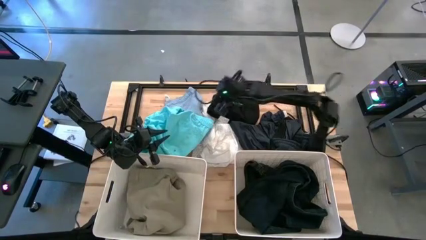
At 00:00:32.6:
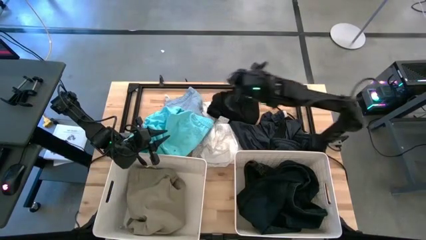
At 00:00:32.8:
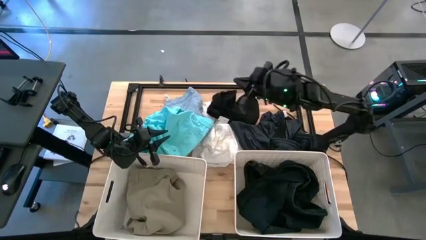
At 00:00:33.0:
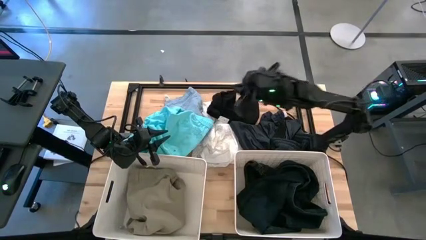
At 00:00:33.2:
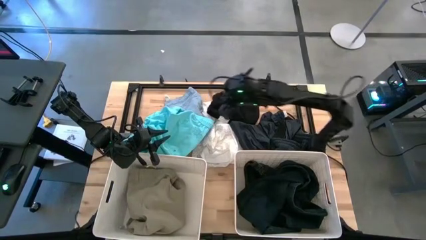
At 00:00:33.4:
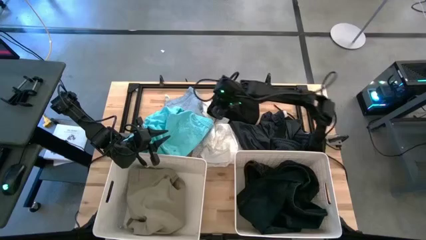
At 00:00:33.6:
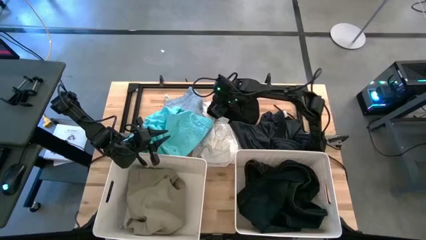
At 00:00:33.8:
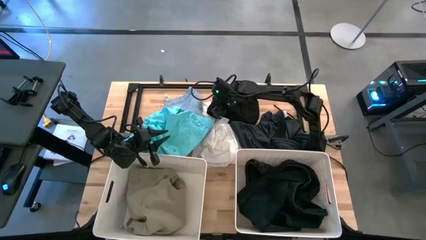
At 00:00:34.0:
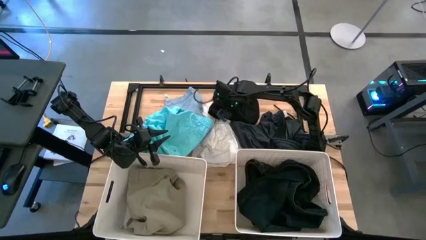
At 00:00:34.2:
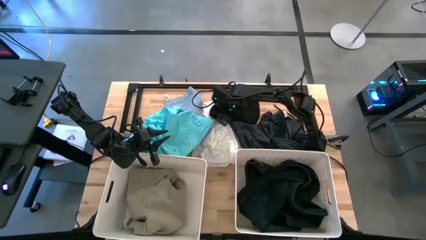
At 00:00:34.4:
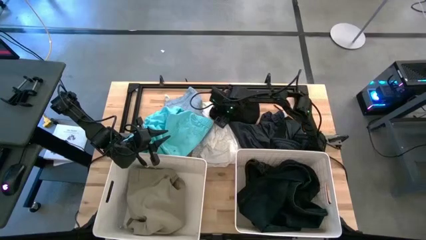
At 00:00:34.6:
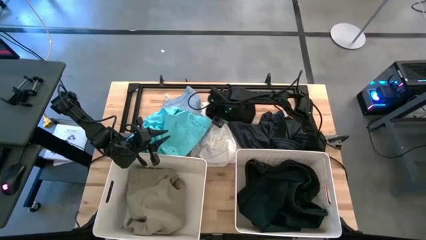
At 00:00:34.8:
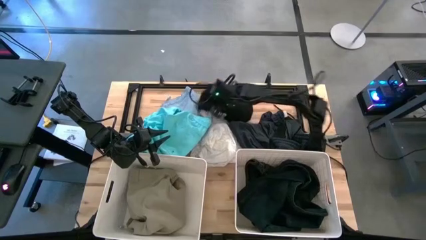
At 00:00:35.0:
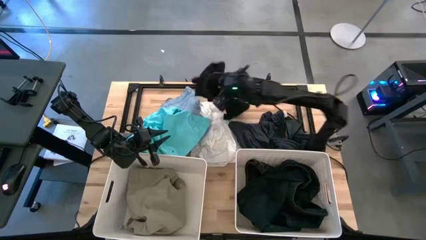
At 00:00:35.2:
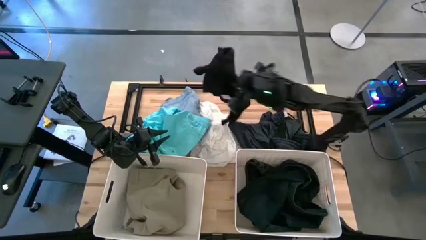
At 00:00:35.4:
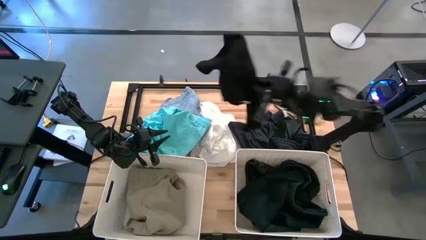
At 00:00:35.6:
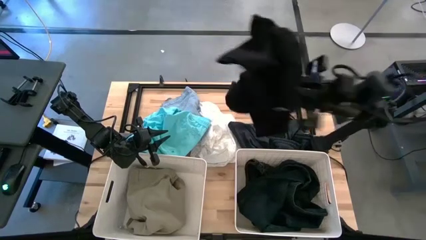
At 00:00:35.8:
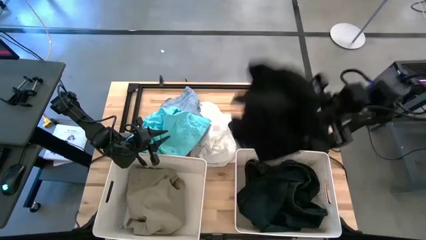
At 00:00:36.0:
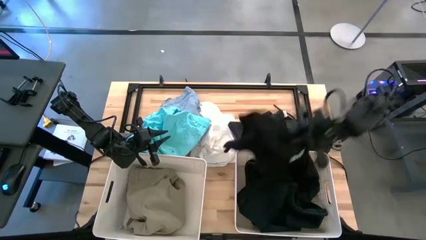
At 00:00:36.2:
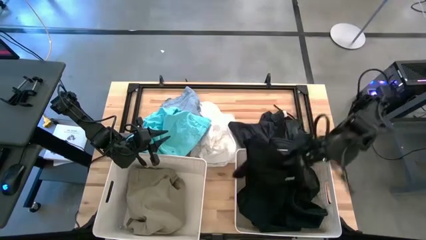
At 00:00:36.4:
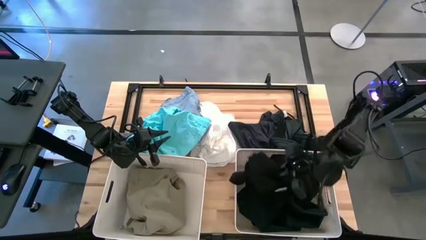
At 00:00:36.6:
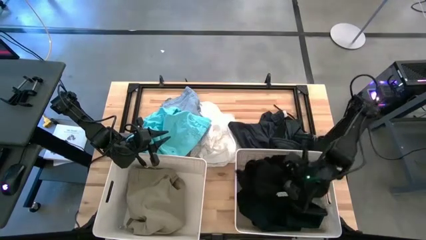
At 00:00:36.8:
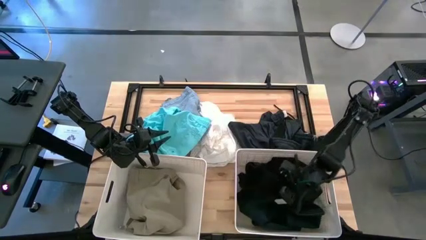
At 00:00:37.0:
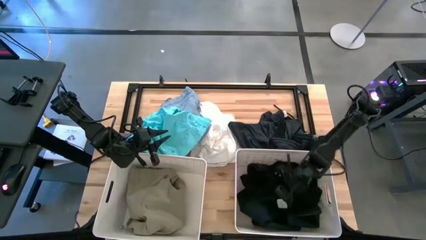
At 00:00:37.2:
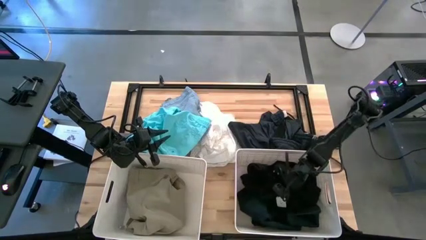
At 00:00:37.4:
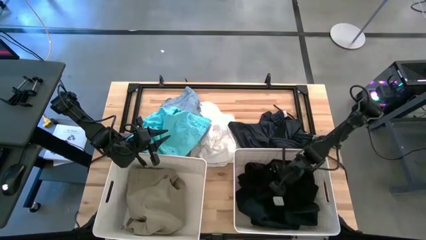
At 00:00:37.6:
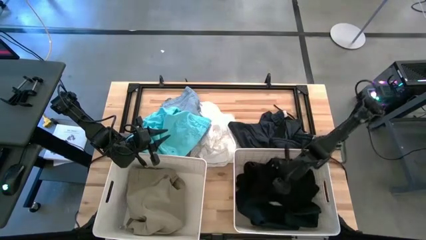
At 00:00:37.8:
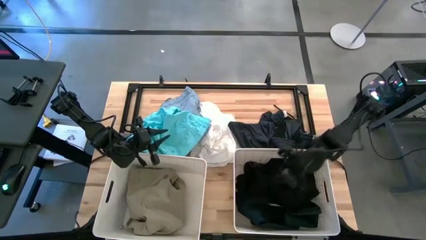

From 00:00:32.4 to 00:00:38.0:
Task: Sort clothes
Put the black shirt into the right white laundry bin

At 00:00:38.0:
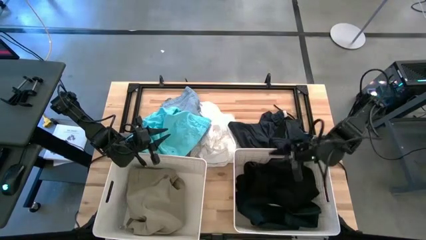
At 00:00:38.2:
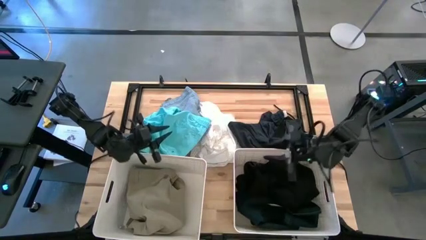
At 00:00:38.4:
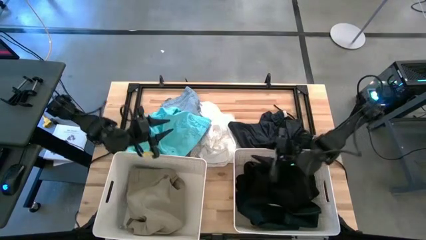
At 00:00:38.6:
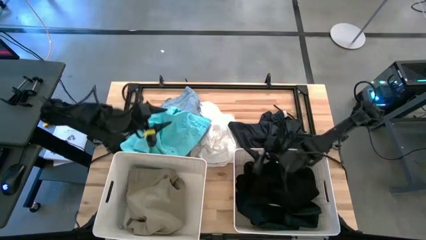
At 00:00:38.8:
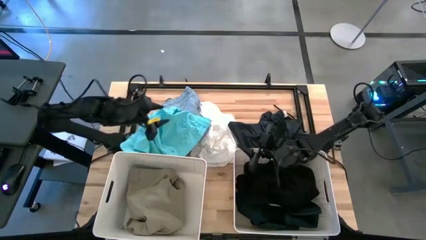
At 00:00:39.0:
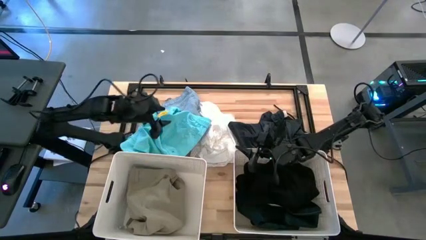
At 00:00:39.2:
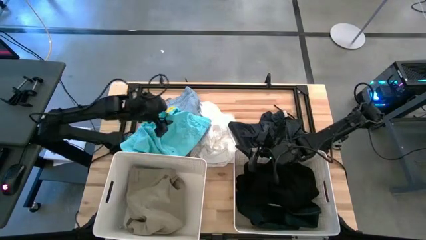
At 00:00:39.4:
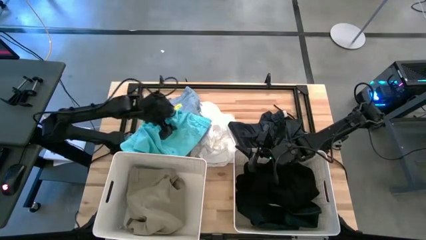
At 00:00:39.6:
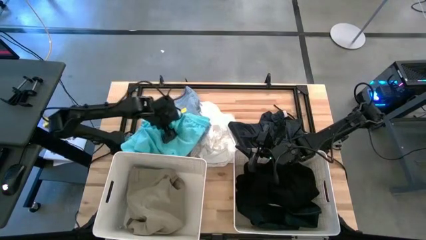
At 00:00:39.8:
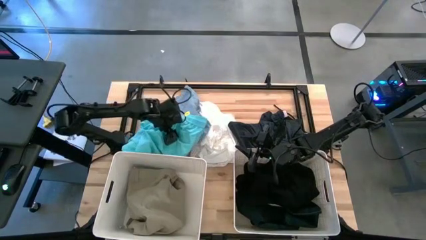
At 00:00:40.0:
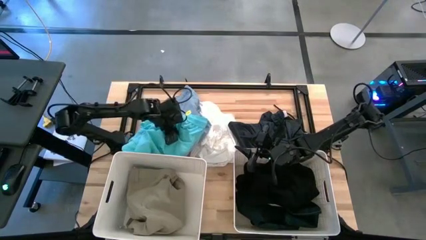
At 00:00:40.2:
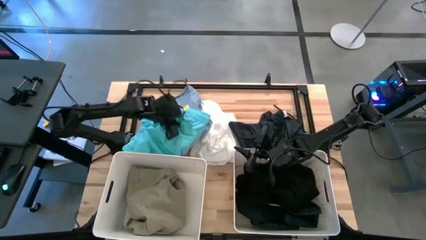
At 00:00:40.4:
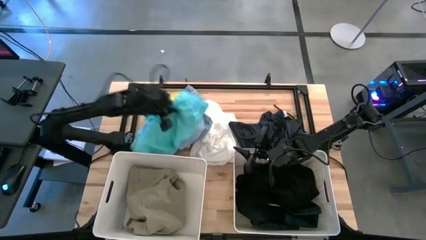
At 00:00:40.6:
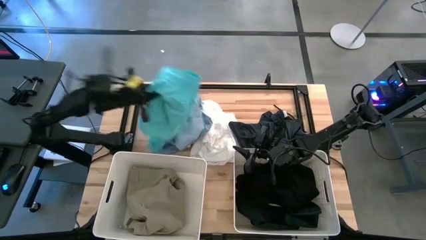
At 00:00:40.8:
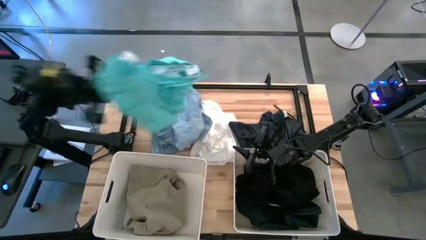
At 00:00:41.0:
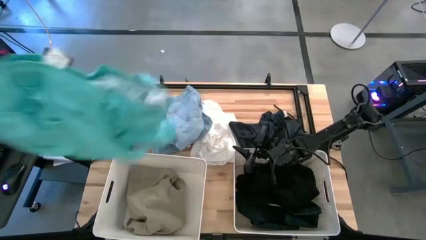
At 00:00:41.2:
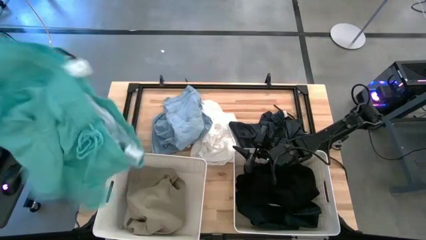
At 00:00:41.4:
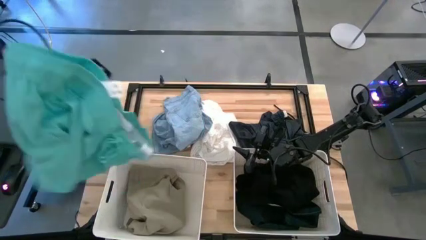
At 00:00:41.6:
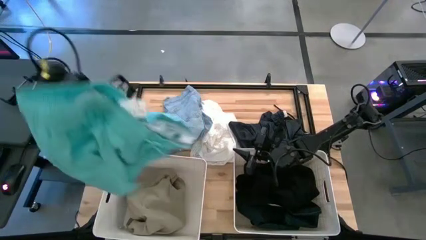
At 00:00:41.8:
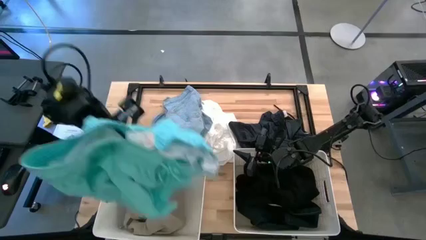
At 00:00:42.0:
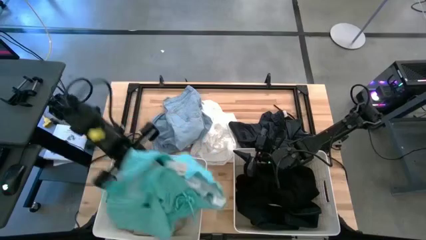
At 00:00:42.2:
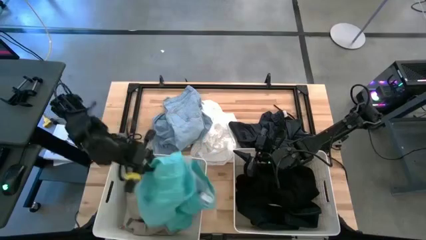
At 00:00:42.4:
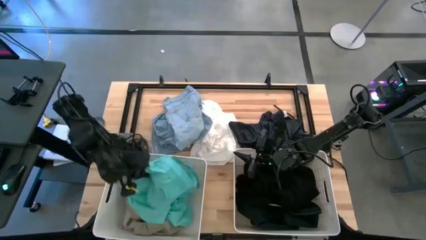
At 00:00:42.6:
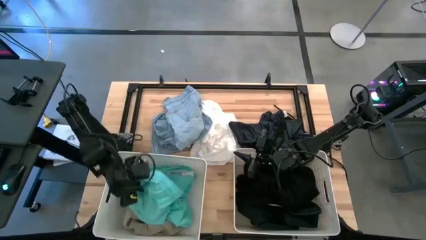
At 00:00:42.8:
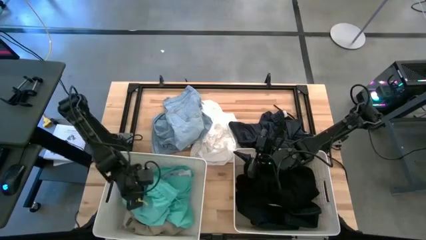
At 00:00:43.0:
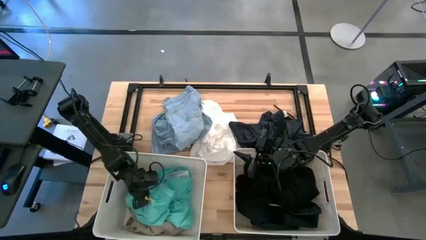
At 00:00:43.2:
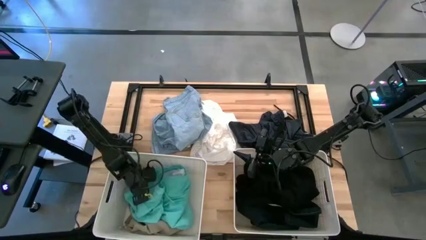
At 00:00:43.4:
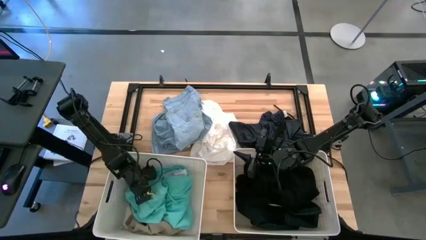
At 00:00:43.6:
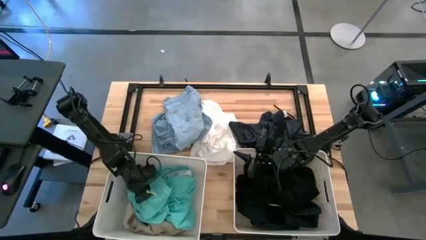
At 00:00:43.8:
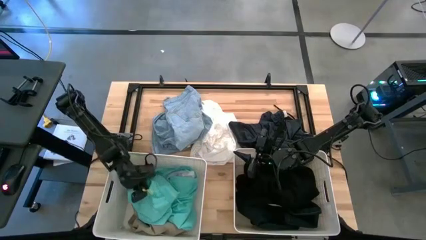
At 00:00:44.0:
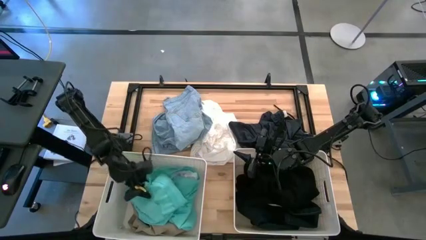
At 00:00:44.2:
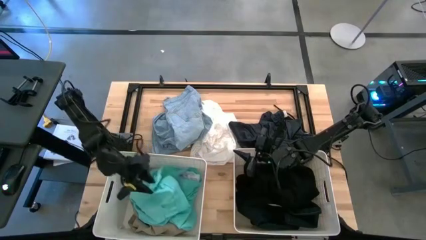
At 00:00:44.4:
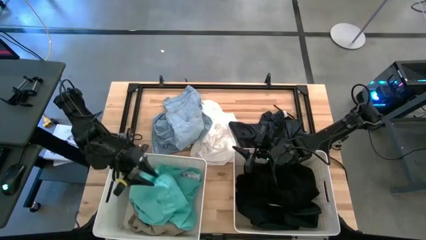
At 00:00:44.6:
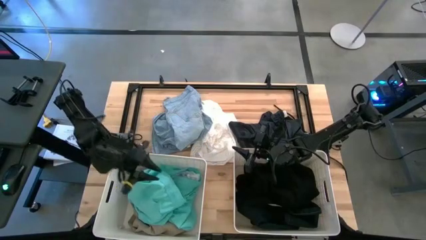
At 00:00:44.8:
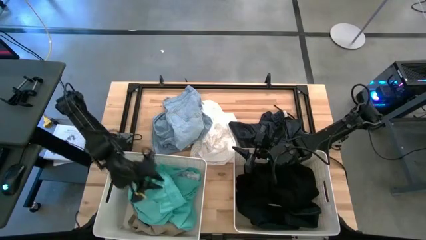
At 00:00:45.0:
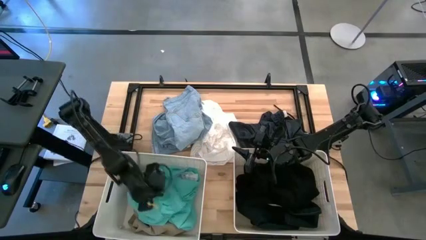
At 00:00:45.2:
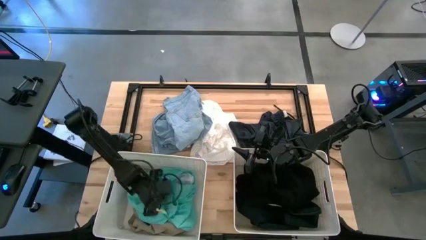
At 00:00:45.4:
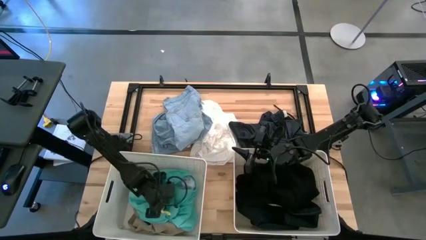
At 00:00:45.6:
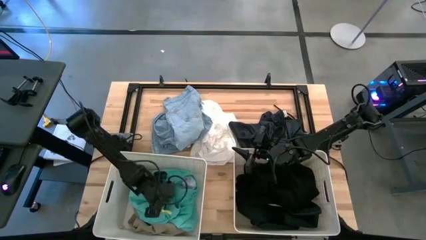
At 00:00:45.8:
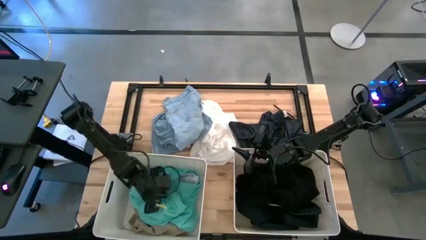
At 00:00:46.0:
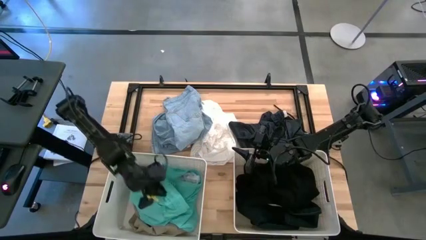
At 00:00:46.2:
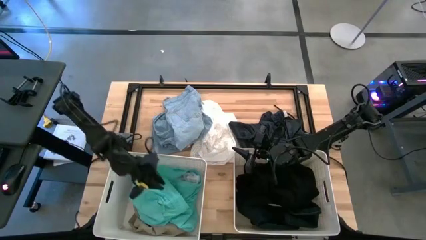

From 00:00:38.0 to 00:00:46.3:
Put the light blue shorts into the left white laundry bin

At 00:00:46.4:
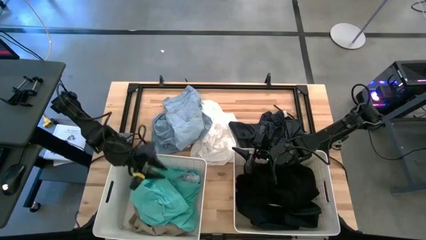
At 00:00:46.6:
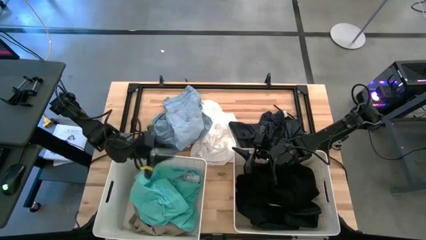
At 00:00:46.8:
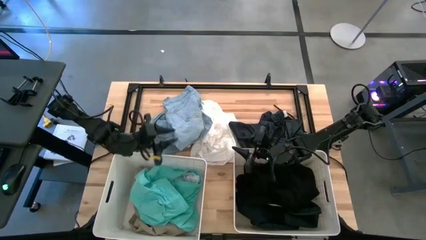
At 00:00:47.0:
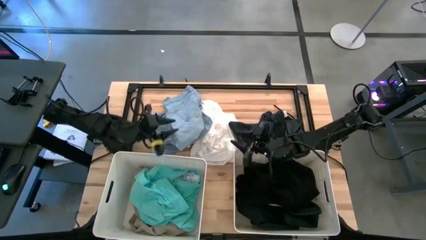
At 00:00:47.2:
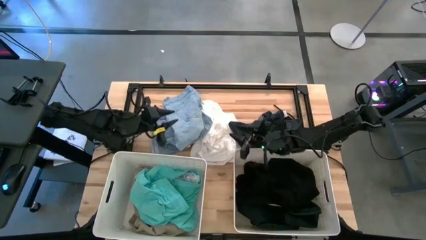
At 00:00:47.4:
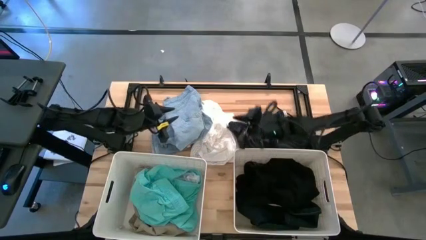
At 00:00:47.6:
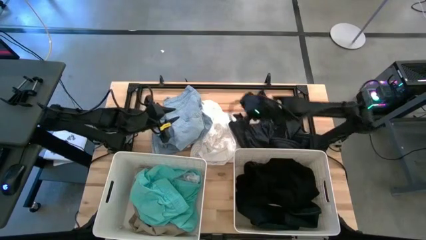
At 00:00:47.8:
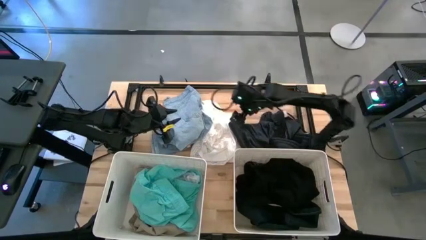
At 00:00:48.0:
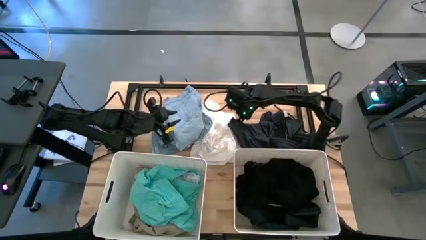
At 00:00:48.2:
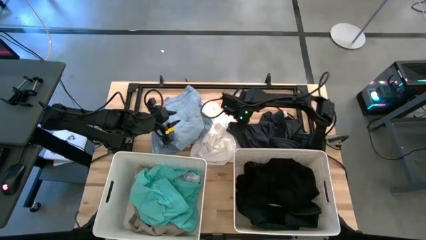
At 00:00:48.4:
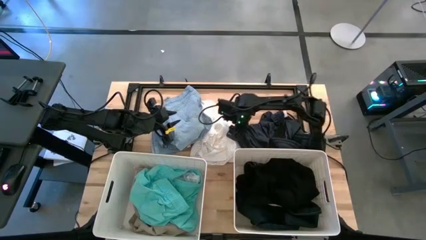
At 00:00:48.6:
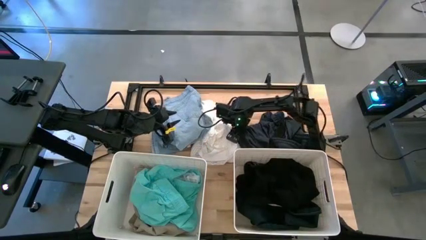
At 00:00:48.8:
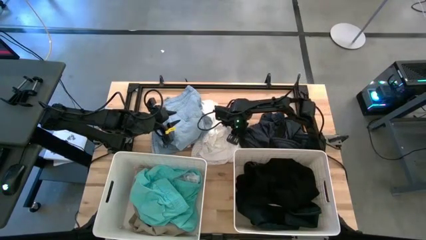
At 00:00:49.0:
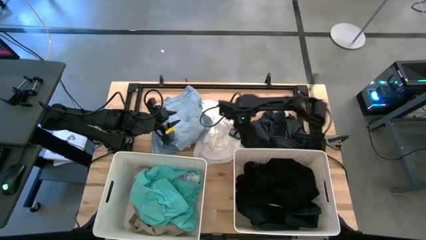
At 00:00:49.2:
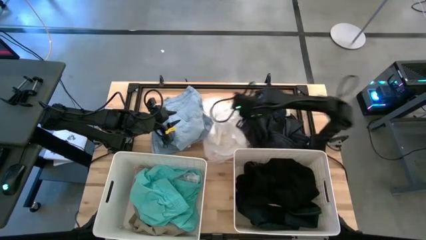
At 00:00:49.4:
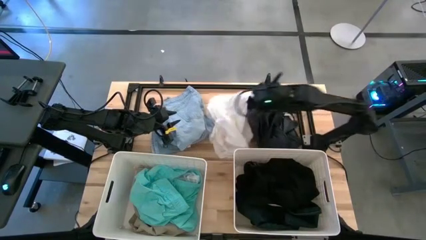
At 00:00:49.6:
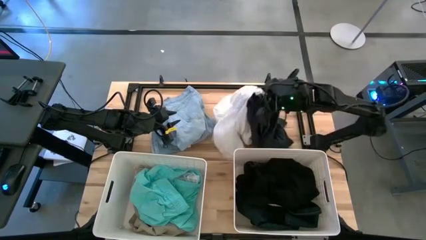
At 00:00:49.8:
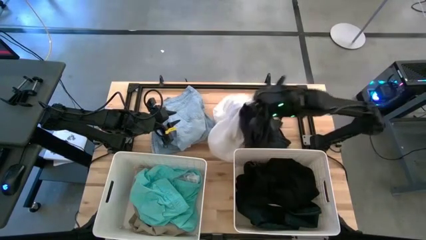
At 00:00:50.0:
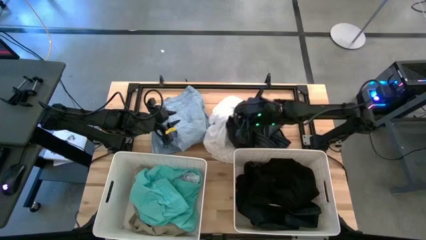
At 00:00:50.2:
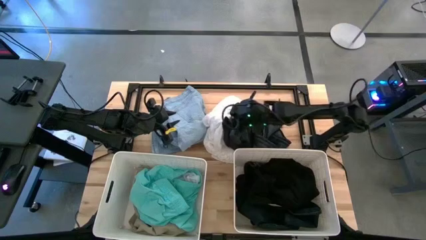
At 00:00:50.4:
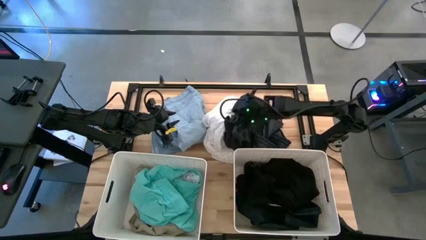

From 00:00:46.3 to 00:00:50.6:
Put the black shorts into the right white laundry bin
